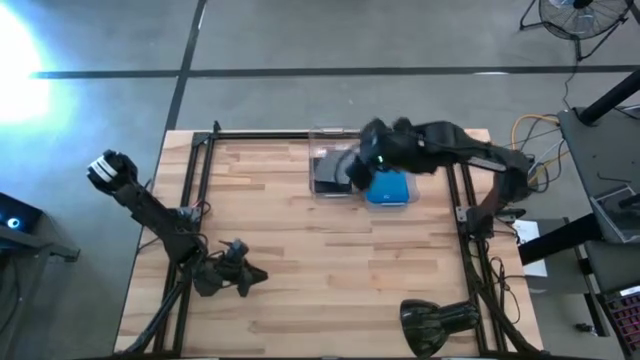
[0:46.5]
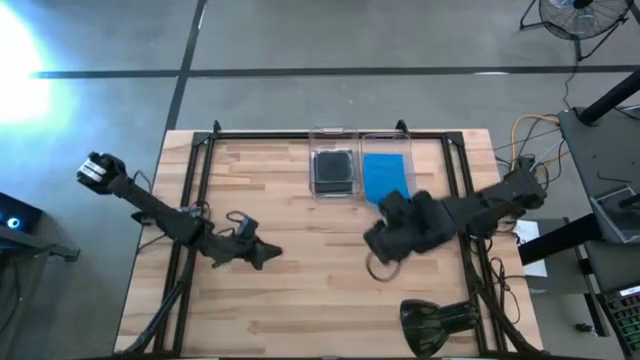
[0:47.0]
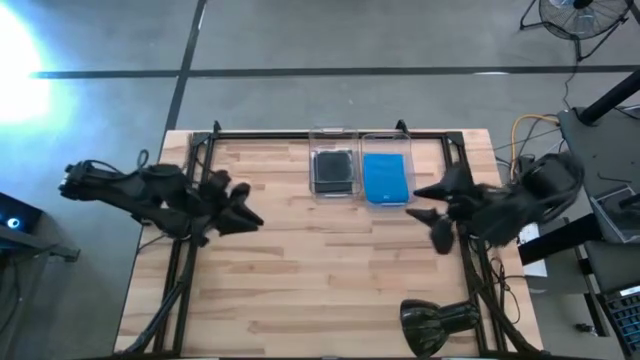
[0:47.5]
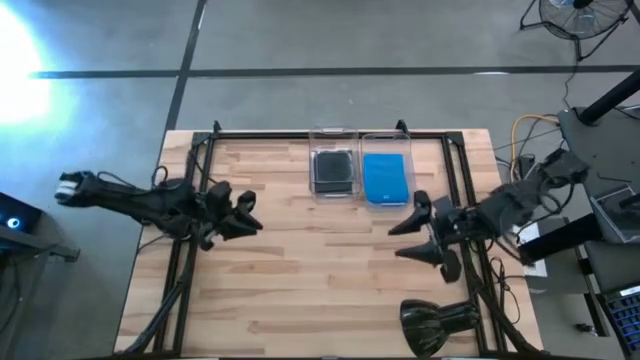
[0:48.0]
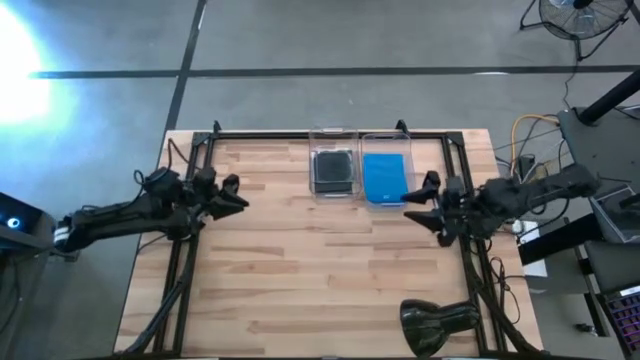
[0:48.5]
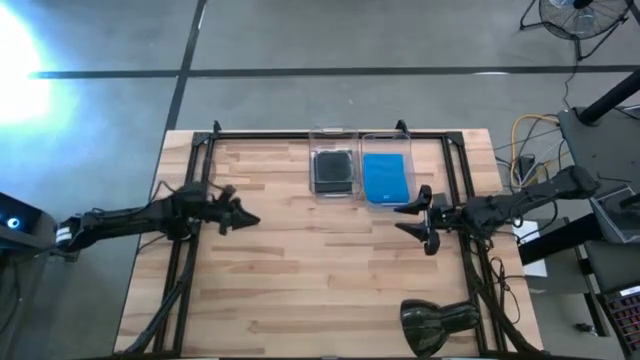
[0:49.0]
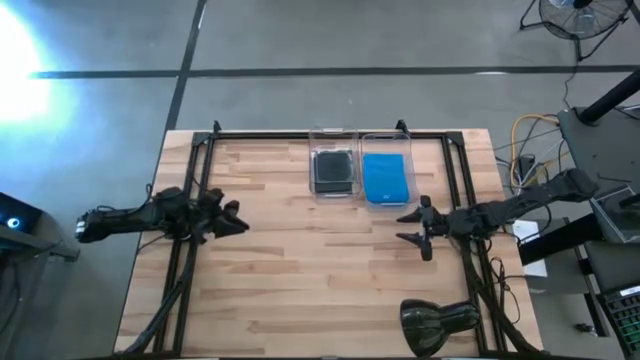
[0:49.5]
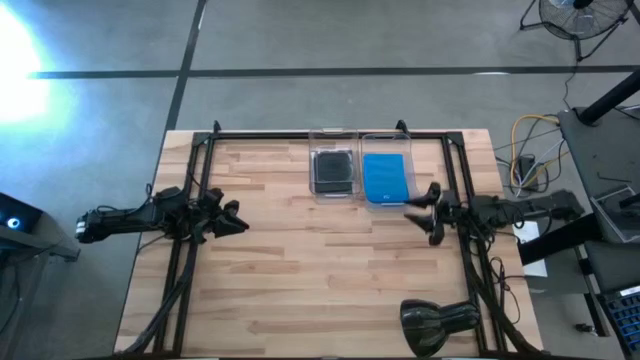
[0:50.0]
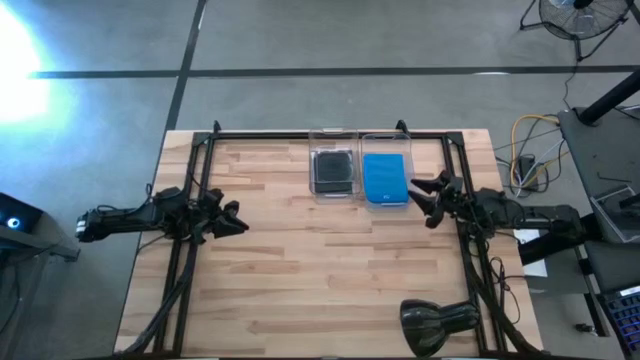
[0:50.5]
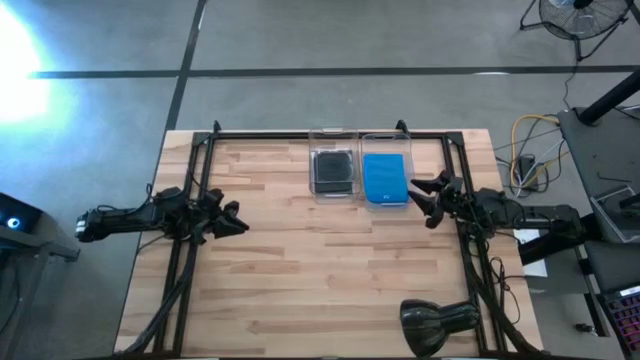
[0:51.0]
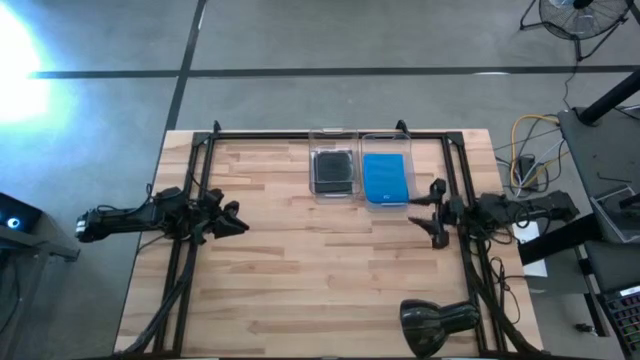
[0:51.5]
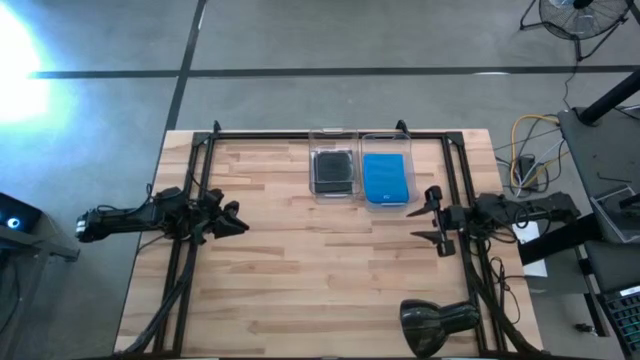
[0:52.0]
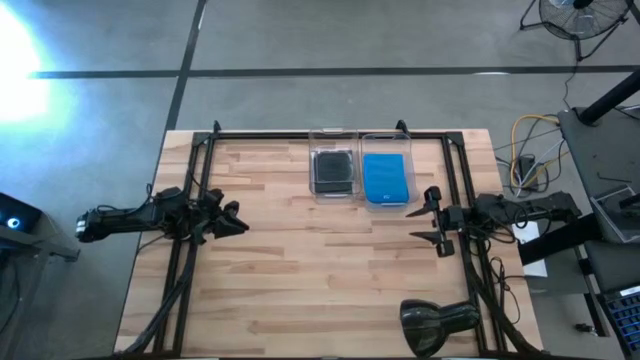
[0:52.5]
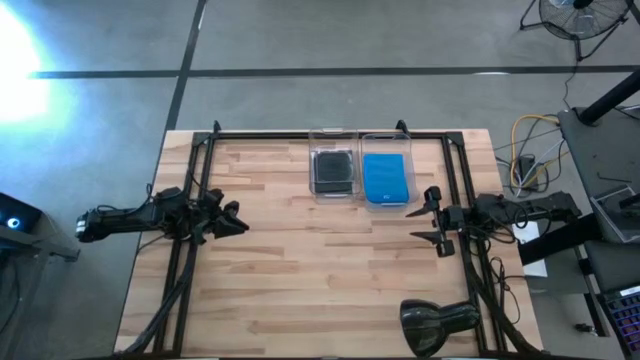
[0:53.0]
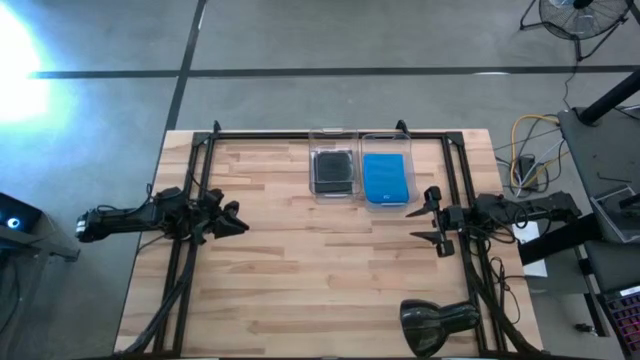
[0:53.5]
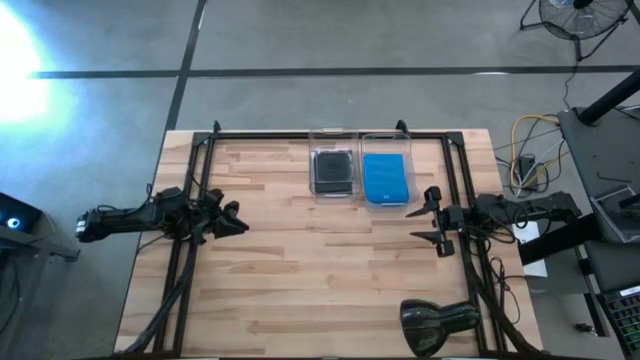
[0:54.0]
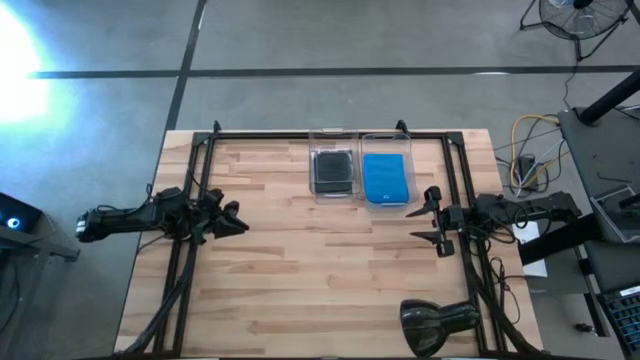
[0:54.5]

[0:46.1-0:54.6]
Task: Pick & place jewel cases by type
Return to Home Position

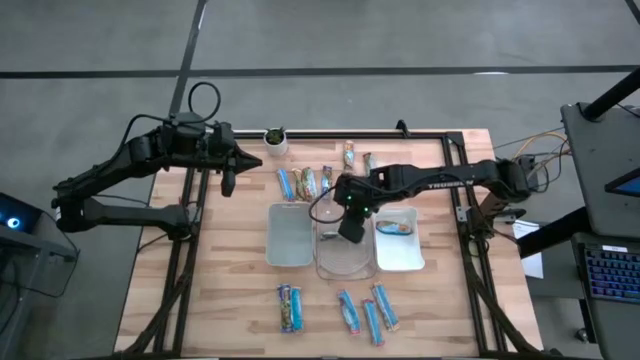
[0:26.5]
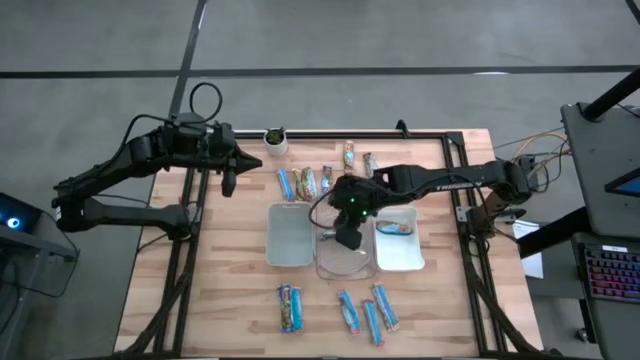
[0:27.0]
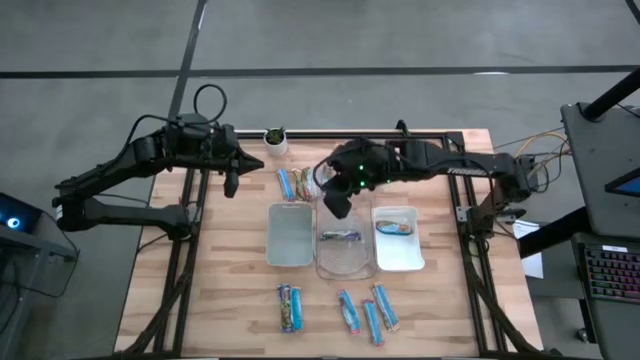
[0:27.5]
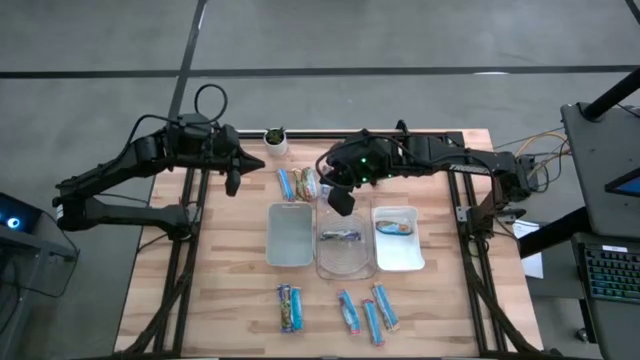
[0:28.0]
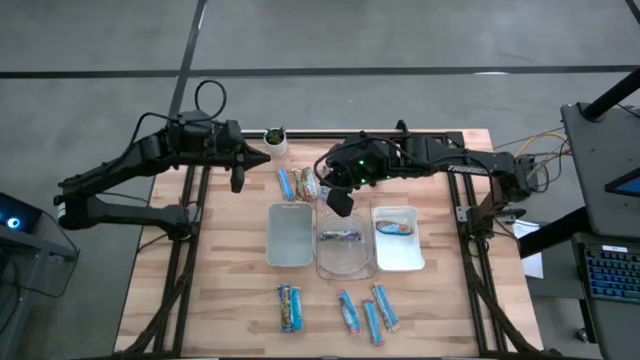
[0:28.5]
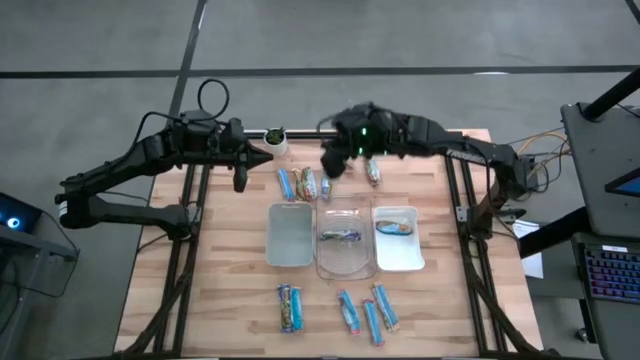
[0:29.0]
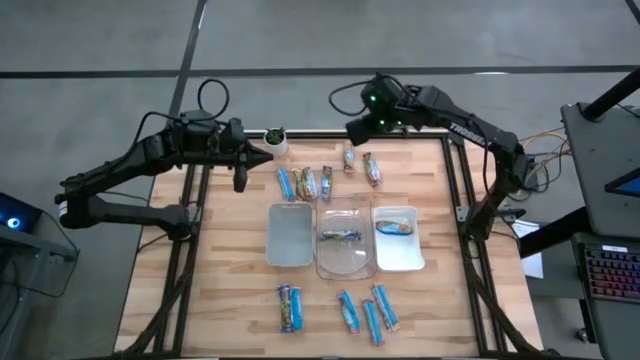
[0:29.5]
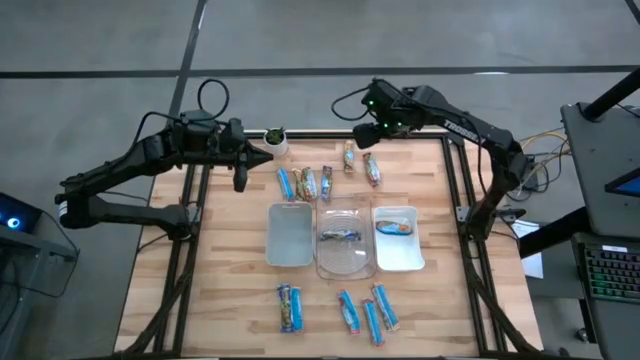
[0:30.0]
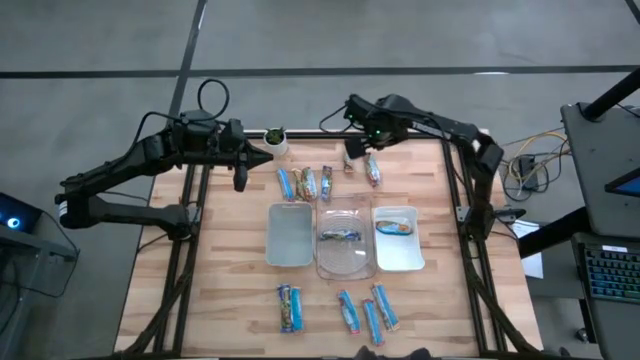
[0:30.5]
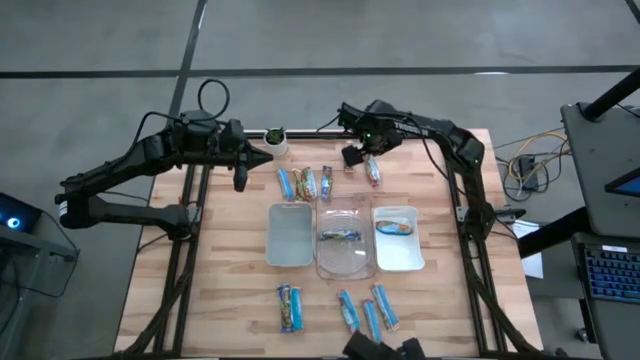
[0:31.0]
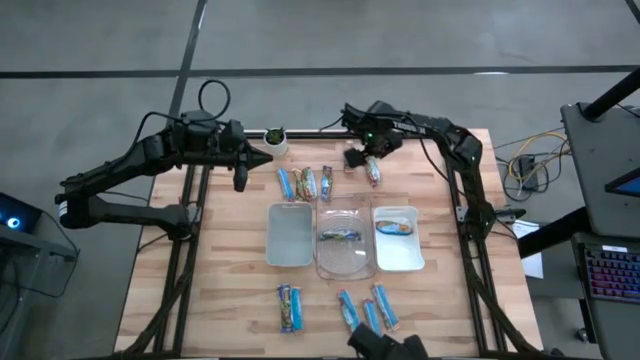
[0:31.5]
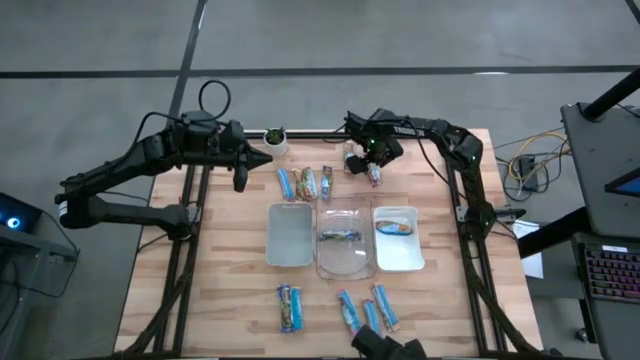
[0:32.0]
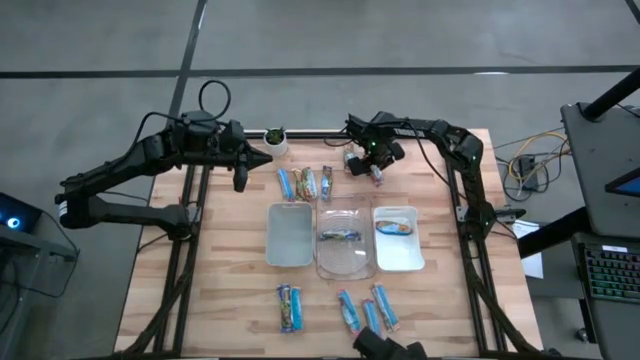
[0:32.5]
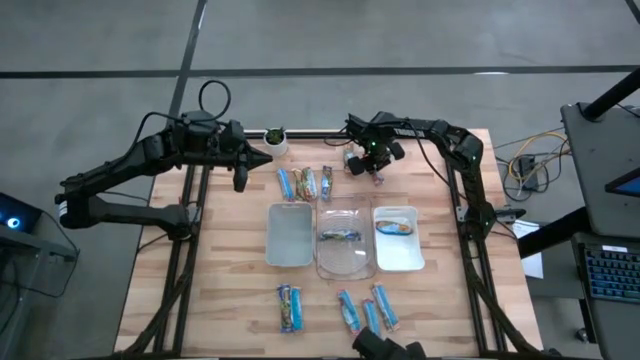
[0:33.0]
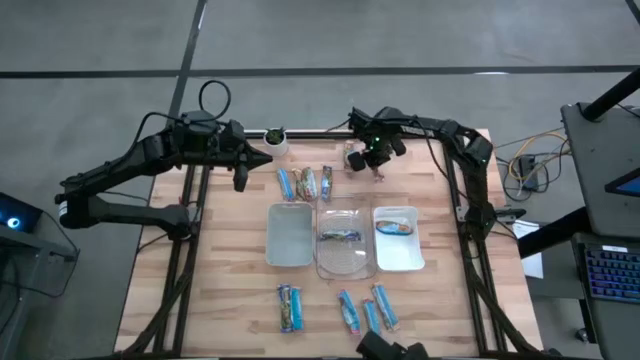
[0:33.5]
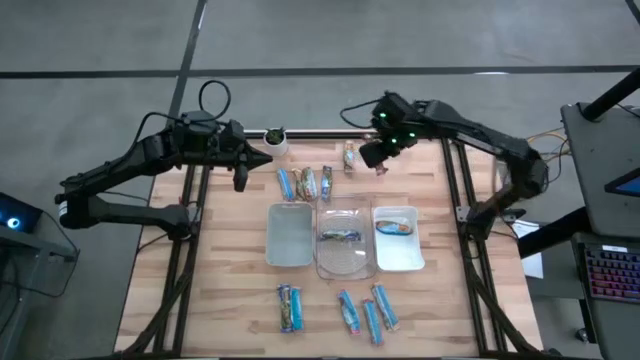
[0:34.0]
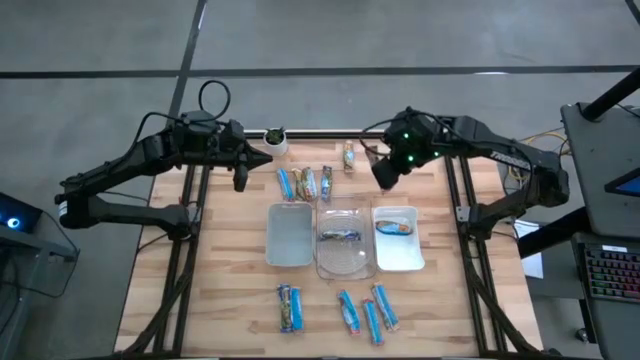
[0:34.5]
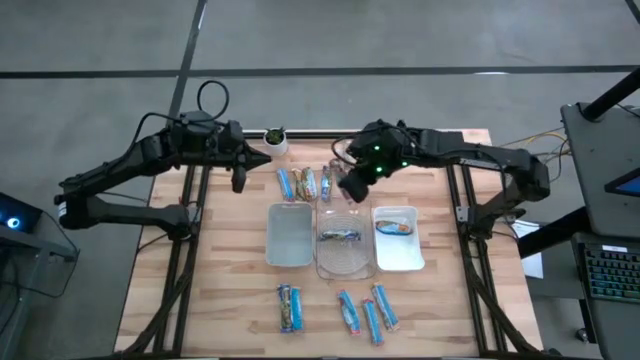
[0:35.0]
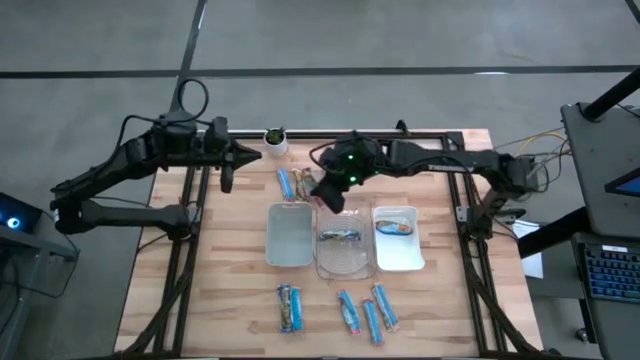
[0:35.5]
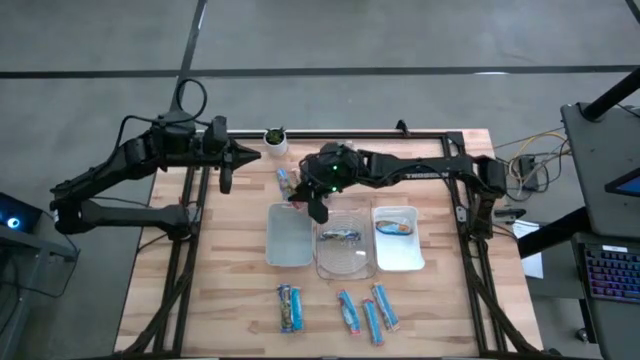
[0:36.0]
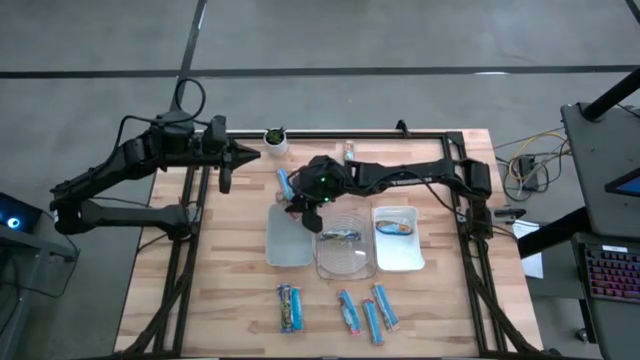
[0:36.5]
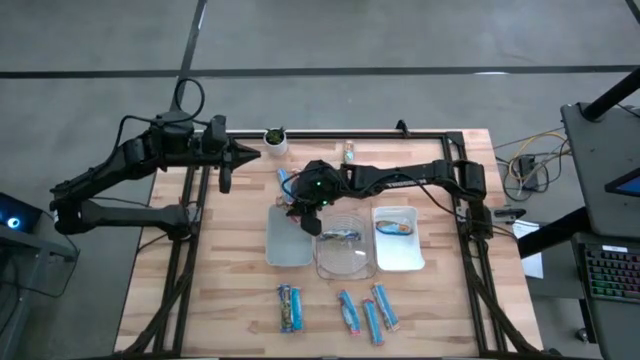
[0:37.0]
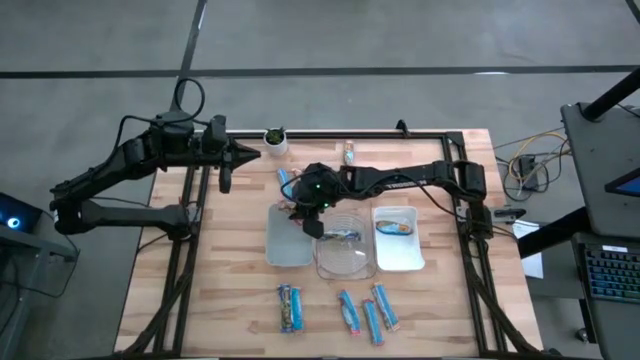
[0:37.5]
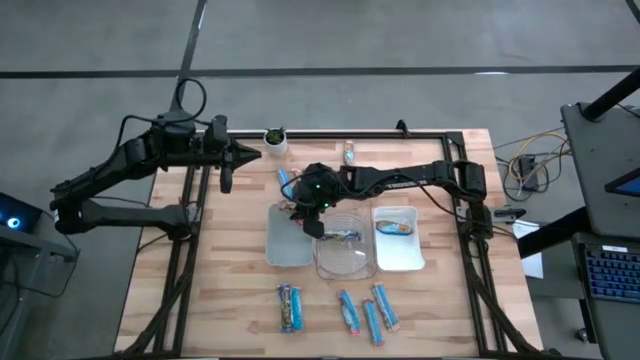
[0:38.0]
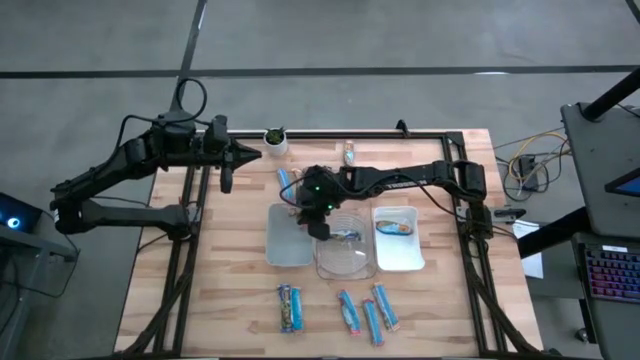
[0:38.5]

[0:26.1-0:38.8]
Task: Pick and place Granola Bars by type
Put the red granola bar into the gray bin
